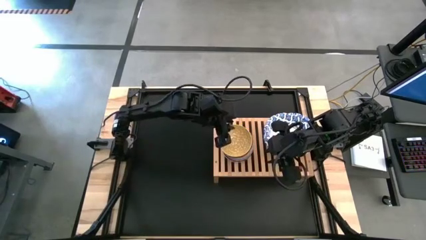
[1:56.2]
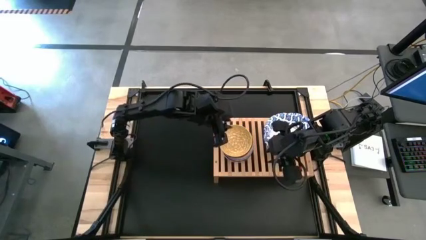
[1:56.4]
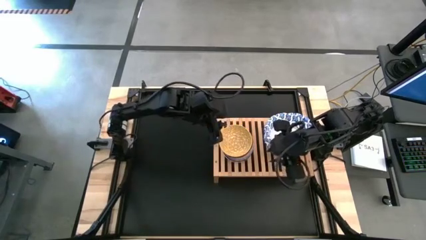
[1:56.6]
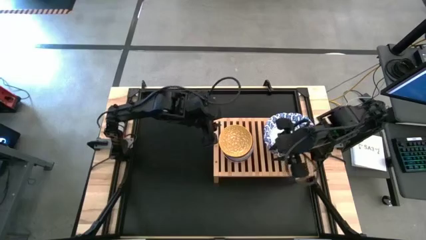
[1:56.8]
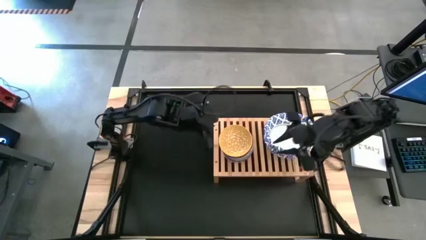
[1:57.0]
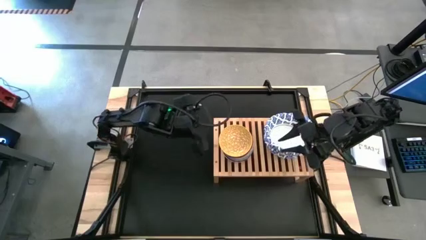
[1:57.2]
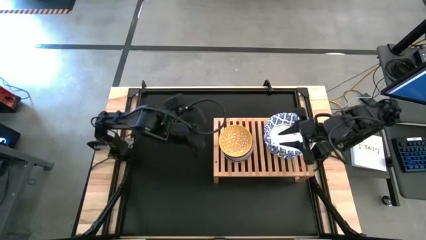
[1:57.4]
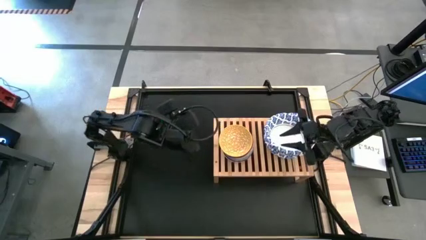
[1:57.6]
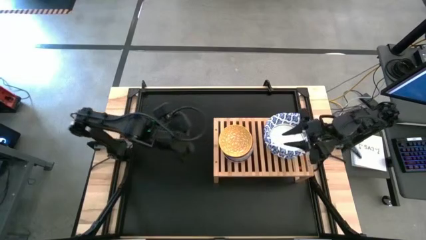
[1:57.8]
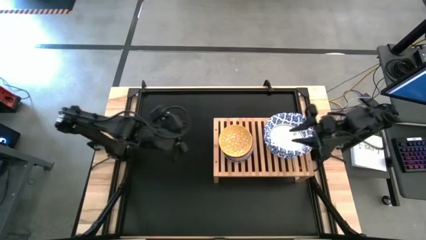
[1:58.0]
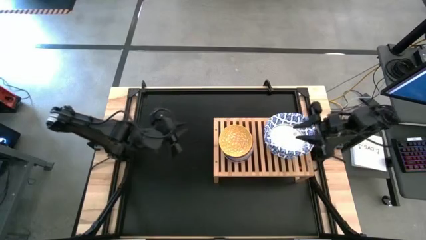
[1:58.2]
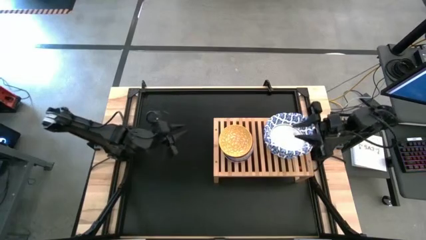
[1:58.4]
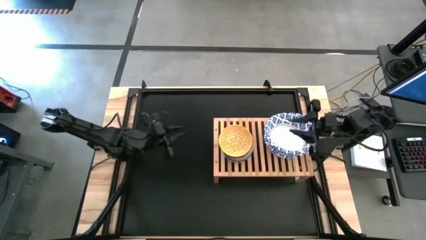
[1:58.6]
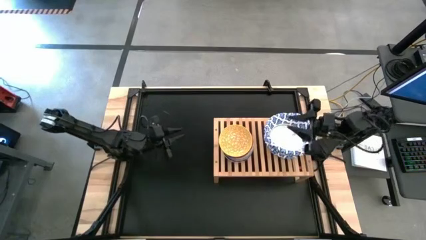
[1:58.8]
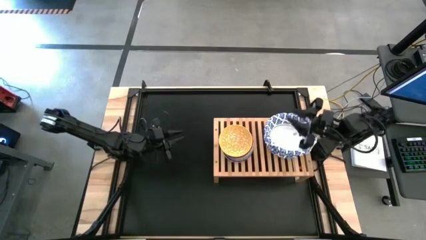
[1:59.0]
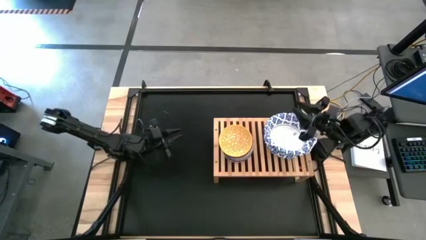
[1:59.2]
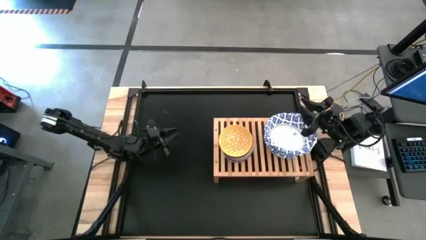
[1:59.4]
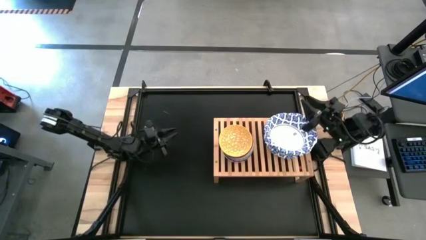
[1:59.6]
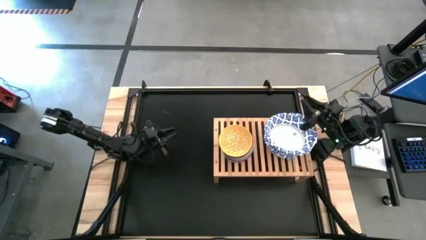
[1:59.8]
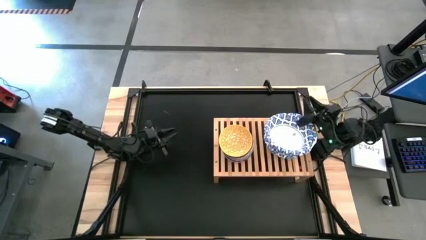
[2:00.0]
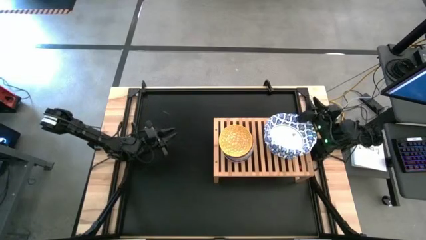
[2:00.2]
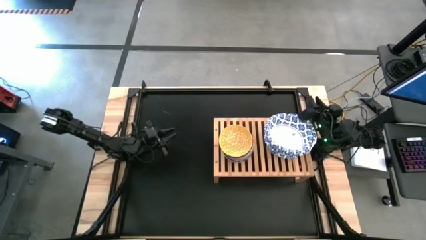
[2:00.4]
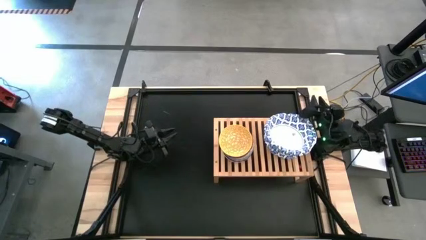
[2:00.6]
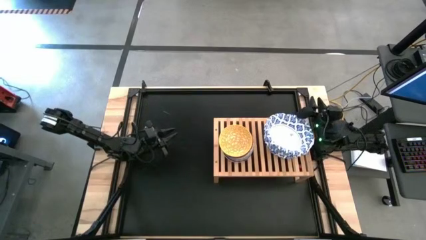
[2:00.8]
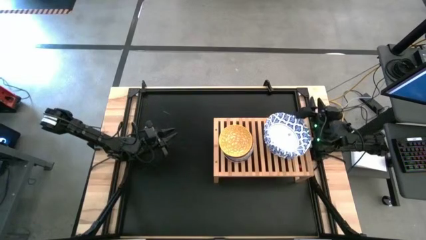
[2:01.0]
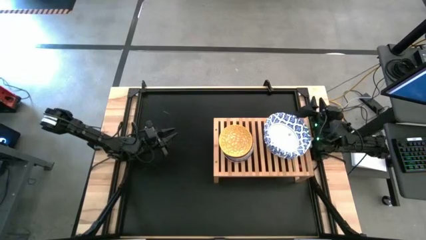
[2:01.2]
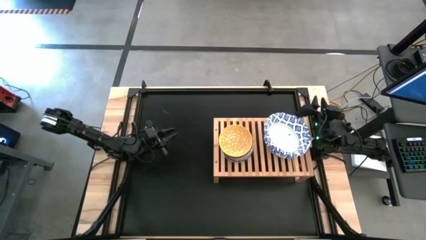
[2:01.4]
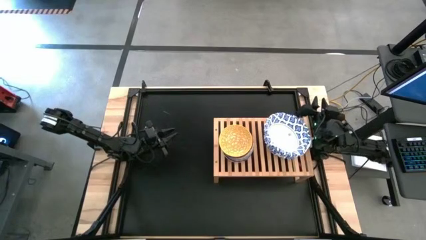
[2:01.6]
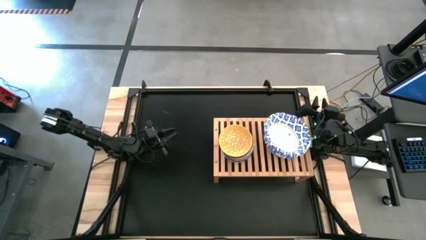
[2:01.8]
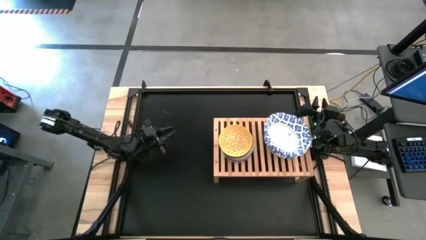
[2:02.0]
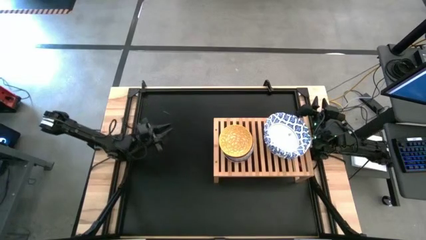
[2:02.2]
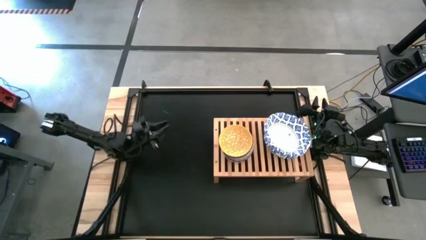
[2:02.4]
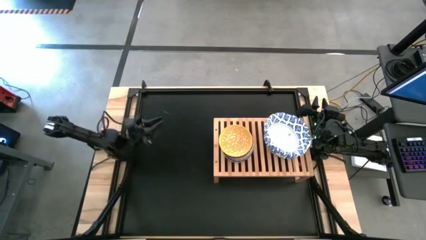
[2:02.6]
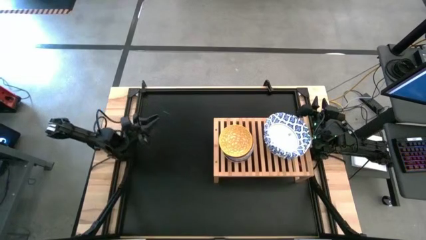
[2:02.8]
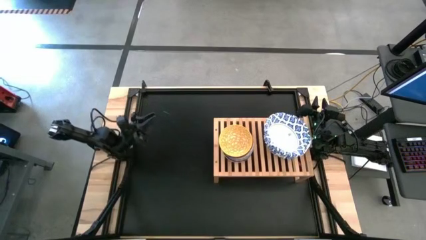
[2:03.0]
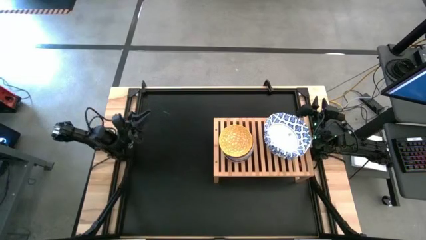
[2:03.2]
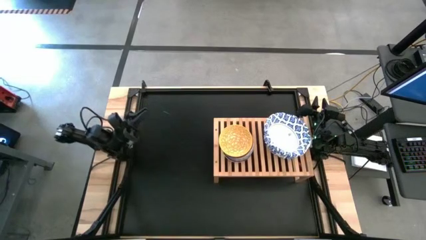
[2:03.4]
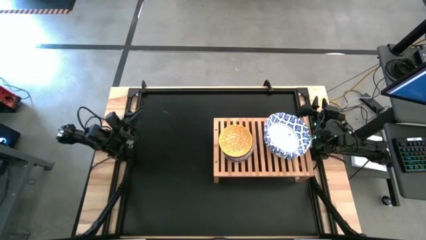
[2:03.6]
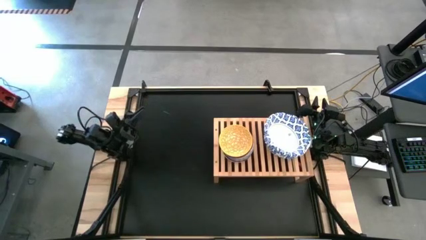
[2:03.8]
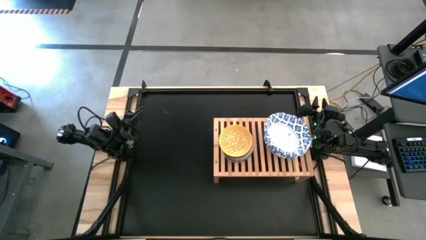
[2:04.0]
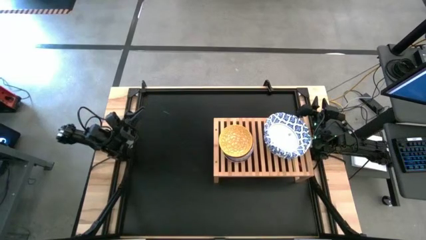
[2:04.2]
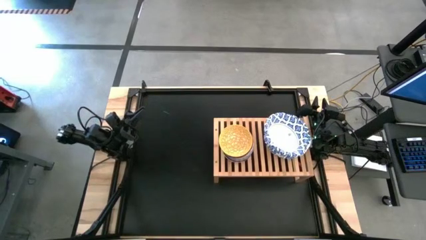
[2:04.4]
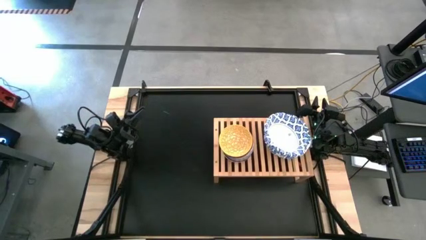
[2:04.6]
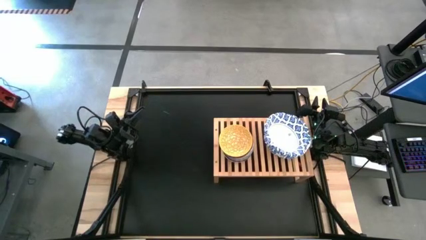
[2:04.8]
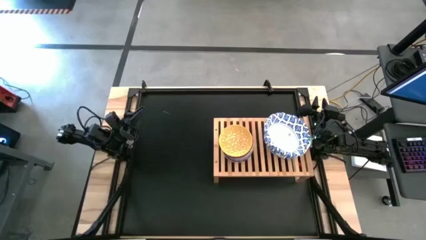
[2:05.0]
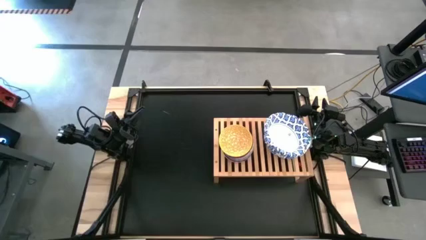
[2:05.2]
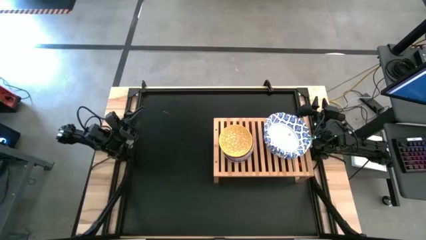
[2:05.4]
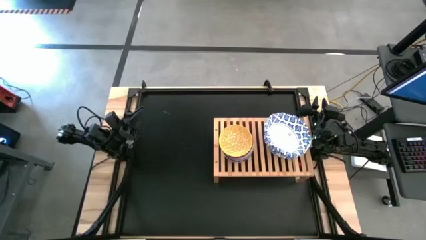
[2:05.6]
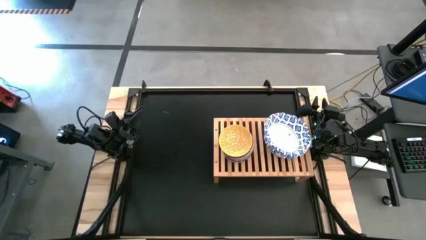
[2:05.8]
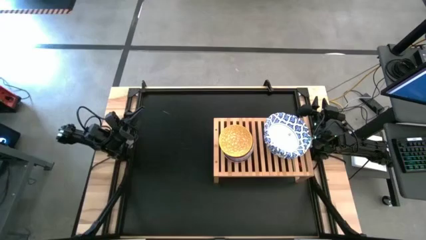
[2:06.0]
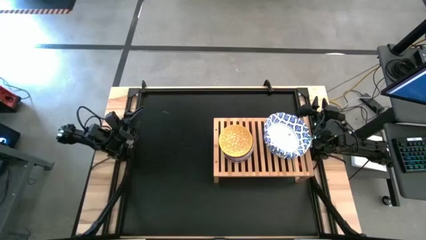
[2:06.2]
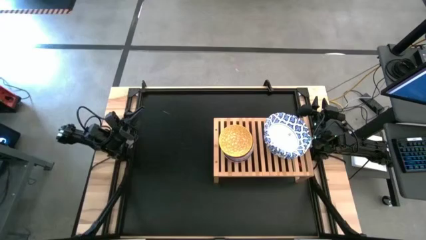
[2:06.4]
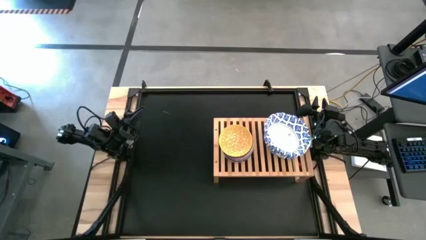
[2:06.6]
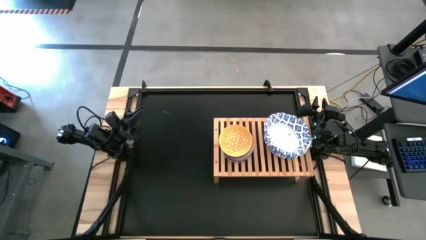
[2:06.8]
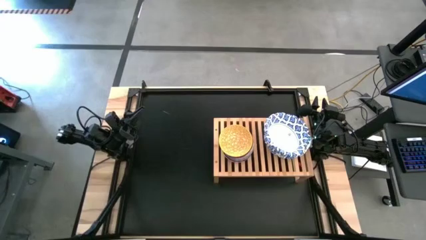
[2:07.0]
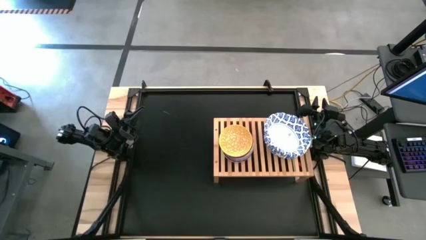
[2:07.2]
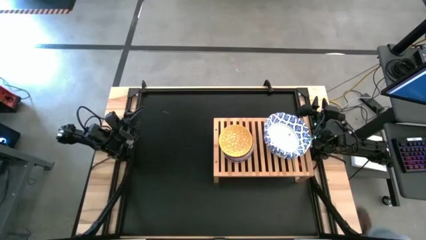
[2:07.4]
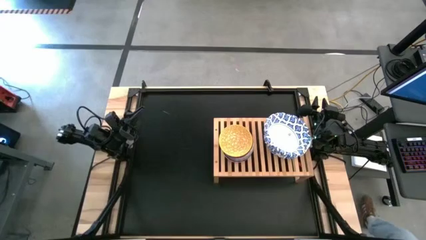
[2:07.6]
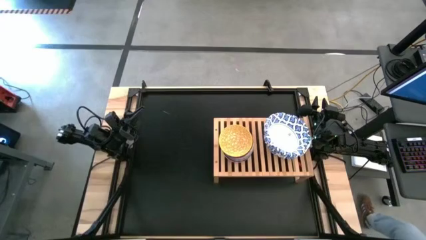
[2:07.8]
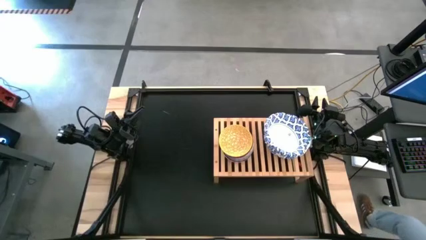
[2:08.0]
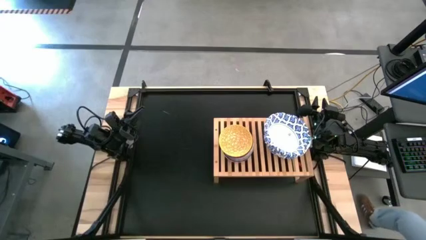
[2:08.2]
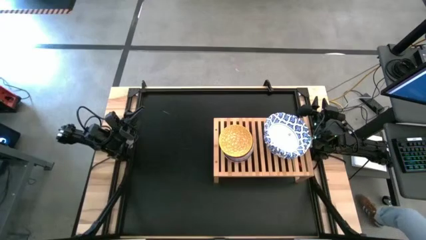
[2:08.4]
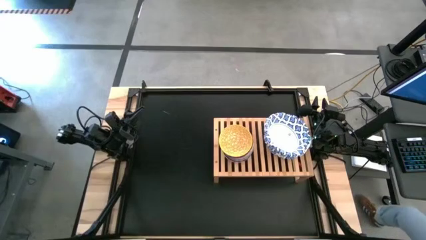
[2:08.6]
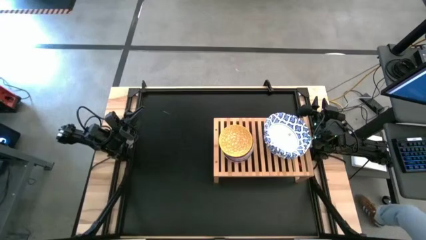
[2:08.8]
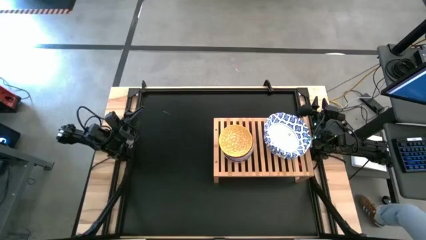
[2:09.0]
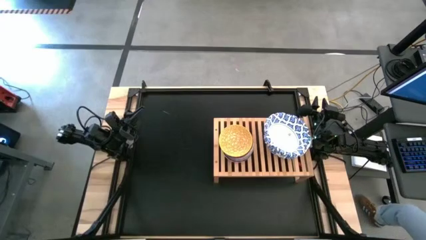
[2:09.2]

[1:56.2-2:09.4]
Task: Place and stack bowls onto a shelf
Return to Home Position

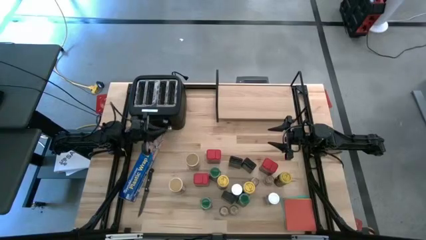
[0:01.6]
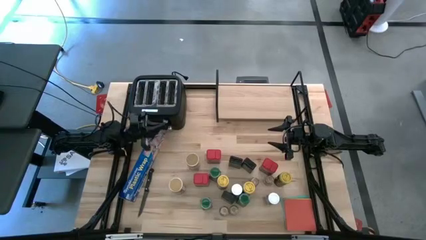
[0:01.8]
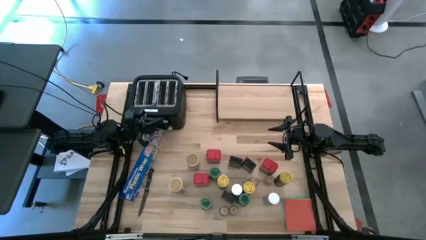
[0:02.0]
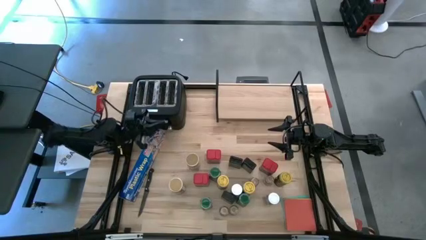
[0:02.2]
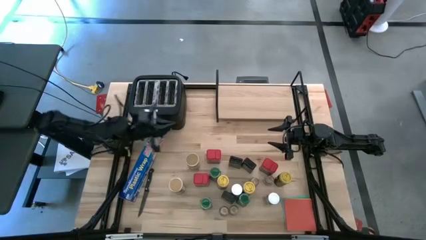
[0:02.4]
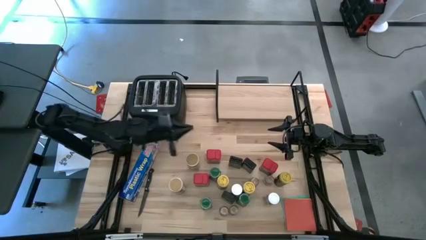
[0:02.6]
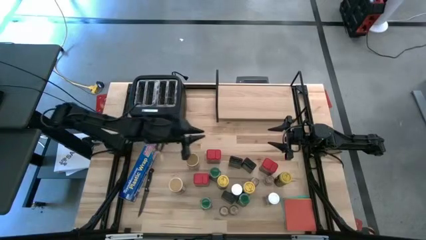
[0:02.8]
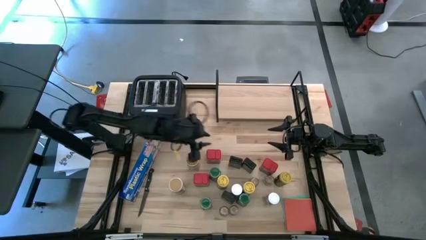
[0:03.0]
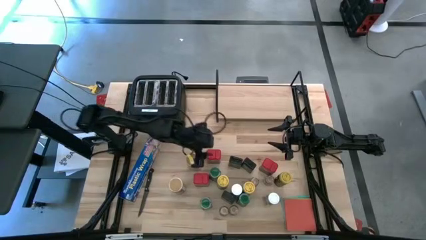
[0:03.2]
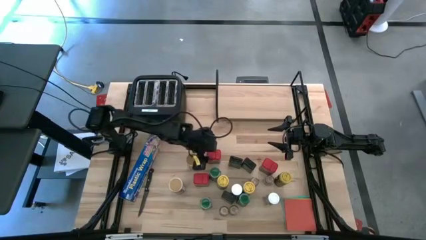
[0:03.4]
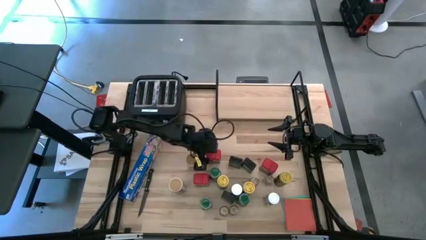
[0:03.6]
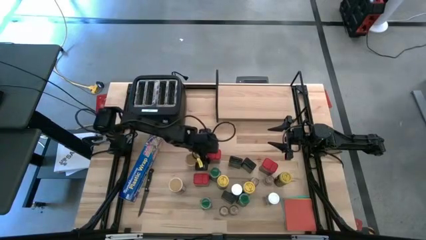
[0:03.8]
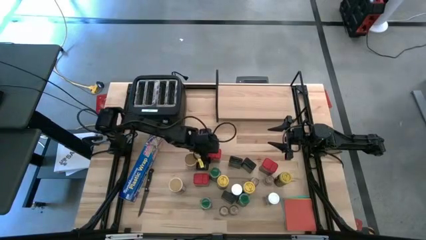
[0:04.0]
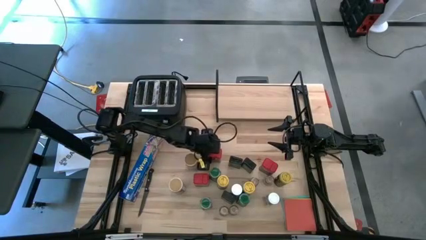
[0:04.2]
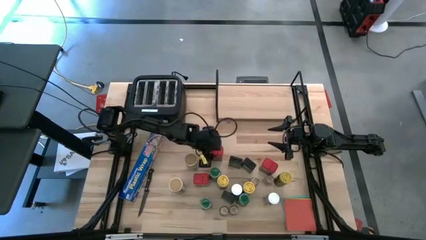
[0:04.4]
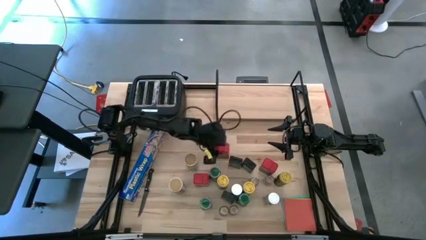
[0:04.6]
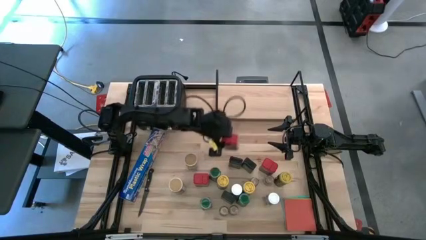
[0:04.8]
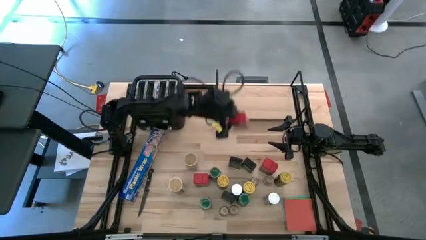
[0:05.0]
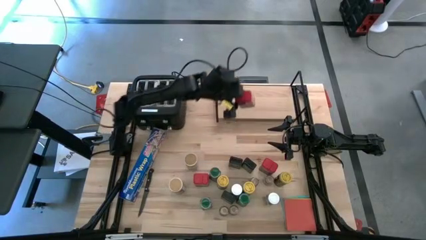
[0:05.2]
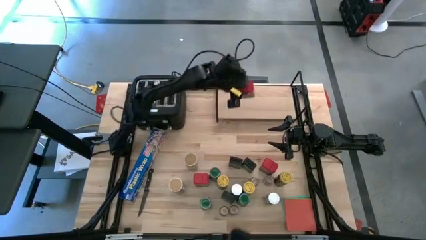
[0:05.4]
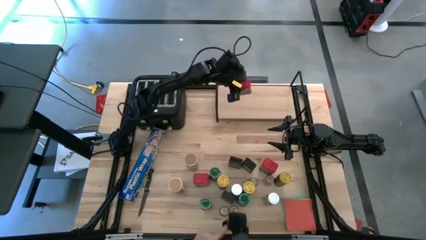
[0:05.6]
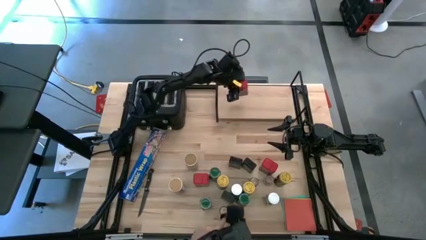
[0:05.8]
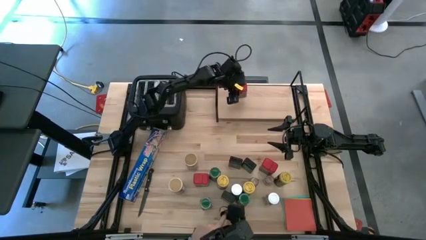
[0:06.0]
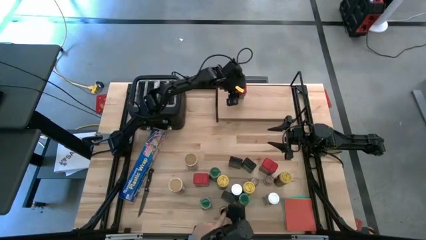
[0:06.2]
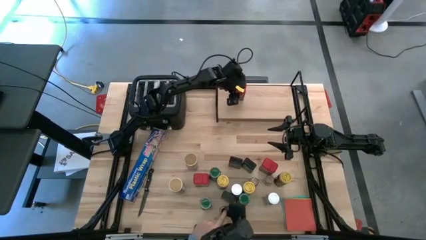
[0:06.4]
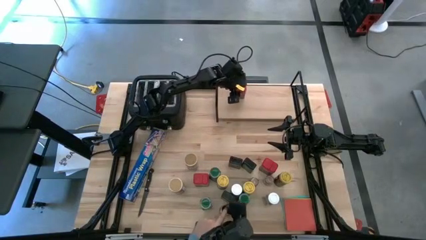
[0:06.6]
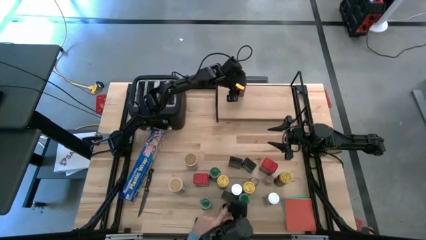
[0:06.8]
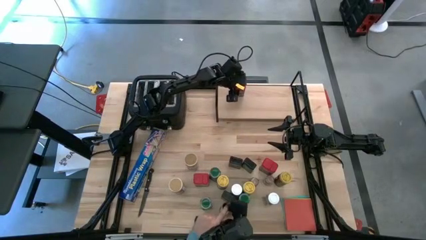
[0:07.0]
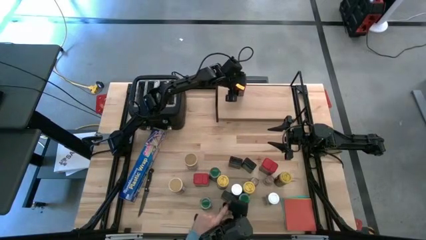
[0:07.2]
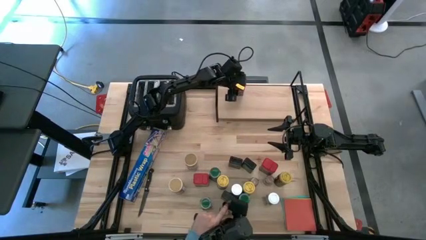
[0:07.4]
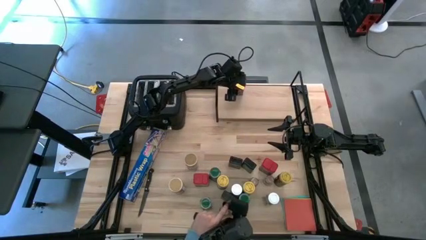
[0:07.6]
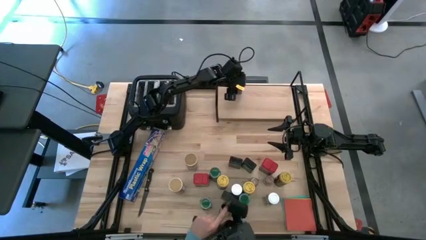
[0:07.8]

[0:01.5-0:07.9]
Task: Shelf spices
Put the top left red seasoning can on the shelf
